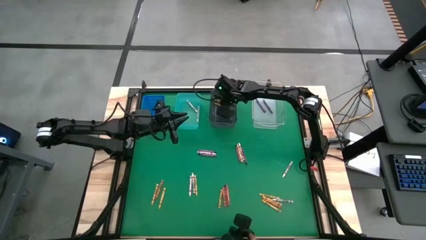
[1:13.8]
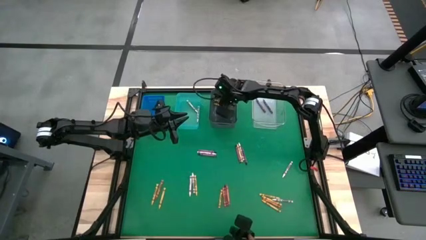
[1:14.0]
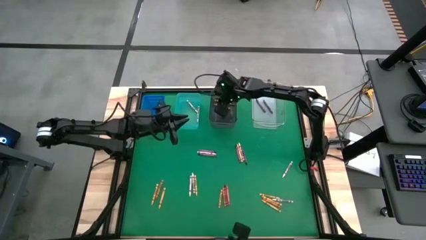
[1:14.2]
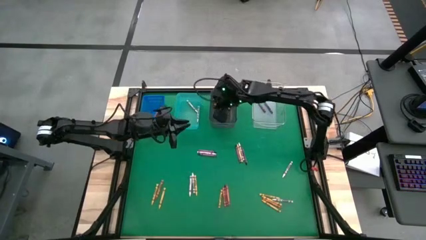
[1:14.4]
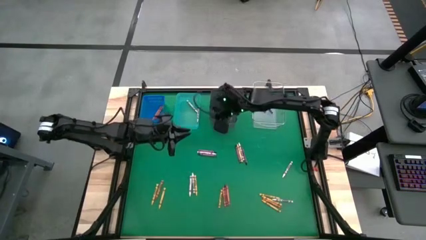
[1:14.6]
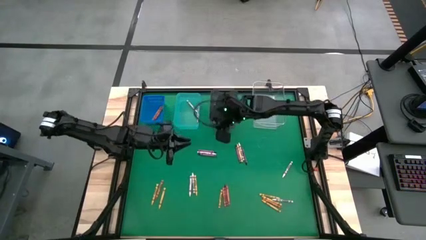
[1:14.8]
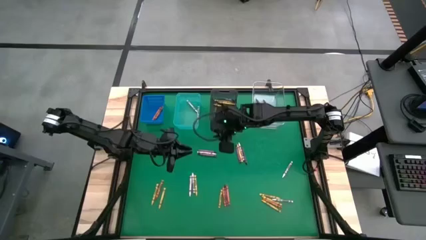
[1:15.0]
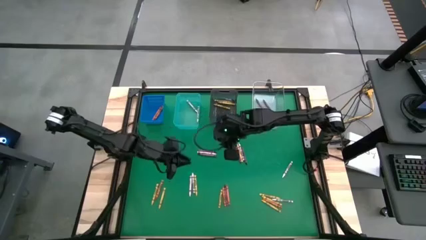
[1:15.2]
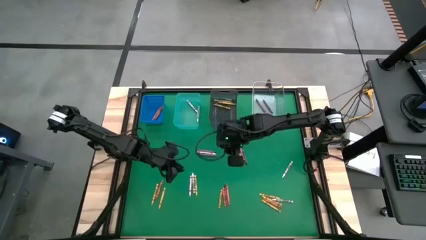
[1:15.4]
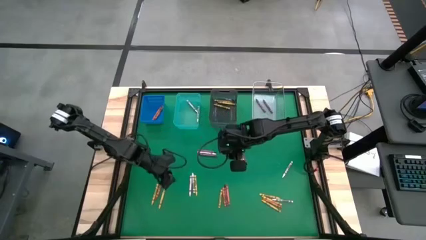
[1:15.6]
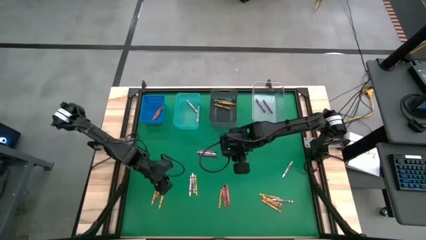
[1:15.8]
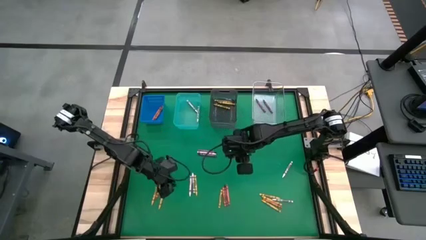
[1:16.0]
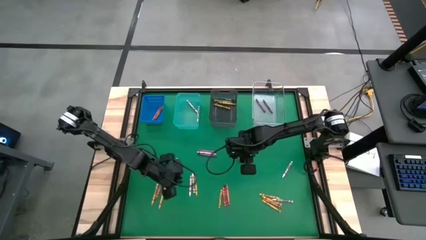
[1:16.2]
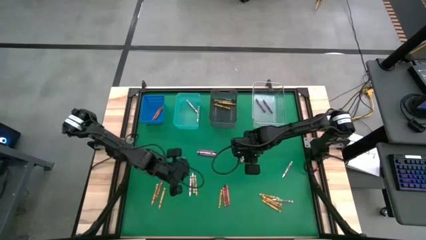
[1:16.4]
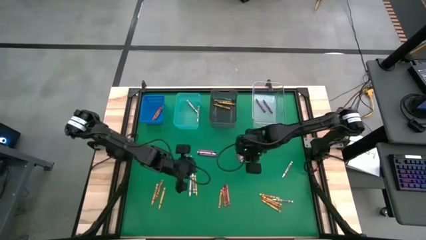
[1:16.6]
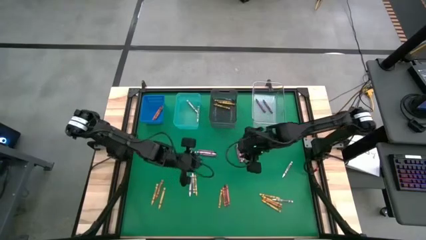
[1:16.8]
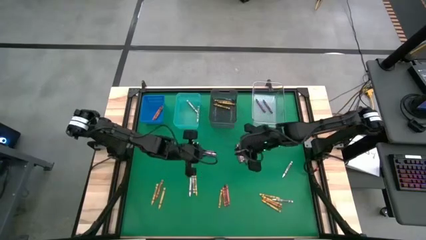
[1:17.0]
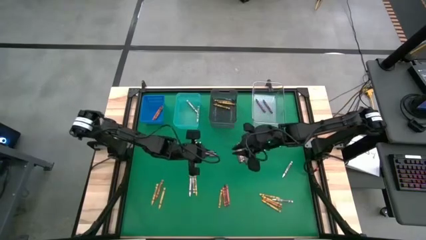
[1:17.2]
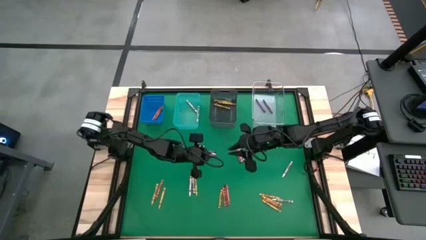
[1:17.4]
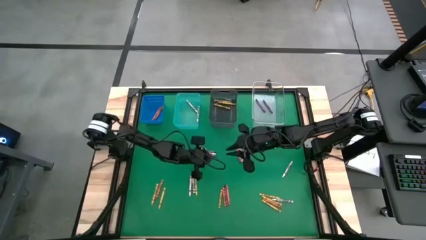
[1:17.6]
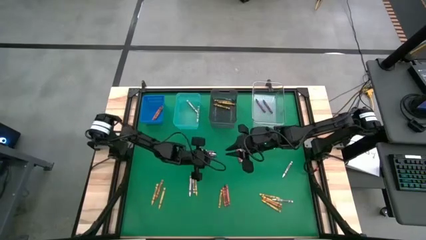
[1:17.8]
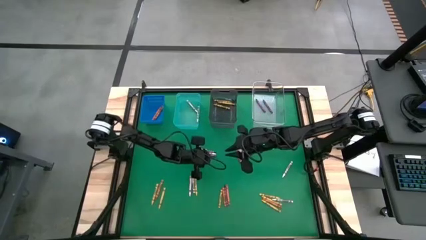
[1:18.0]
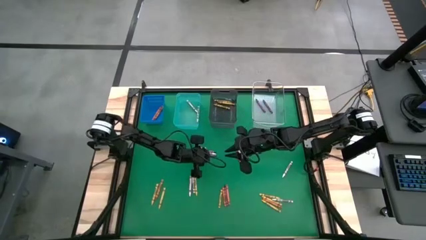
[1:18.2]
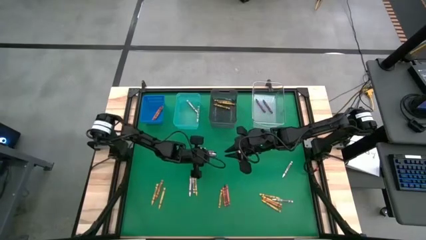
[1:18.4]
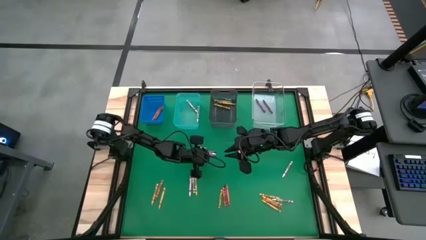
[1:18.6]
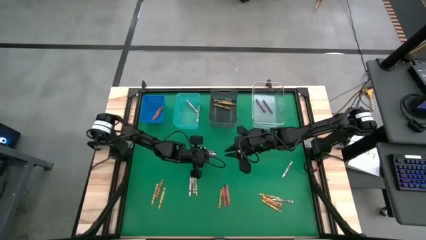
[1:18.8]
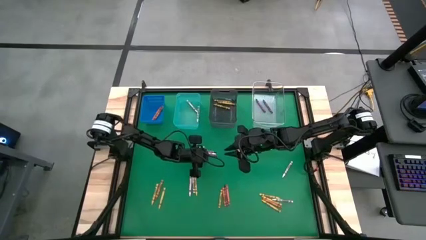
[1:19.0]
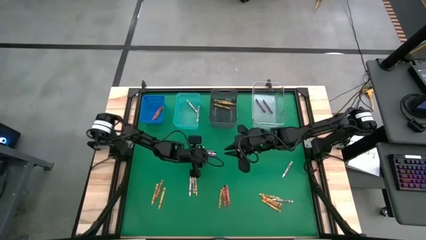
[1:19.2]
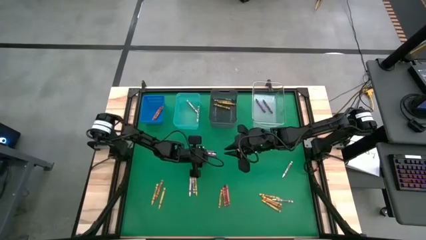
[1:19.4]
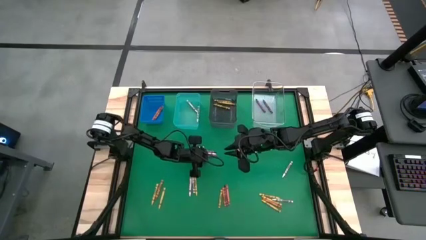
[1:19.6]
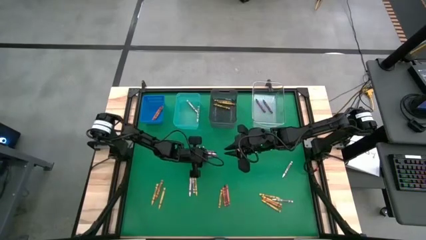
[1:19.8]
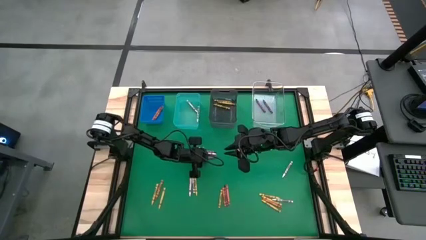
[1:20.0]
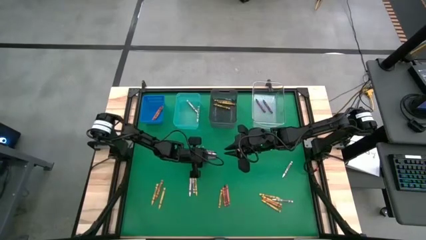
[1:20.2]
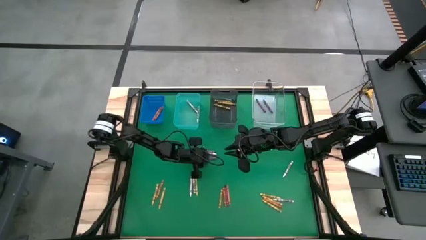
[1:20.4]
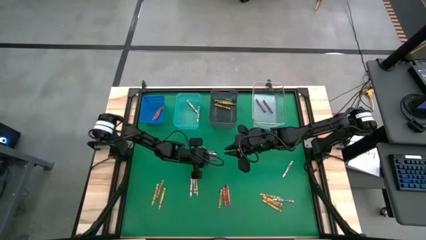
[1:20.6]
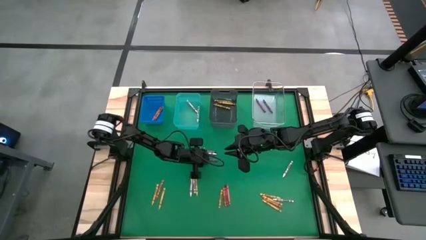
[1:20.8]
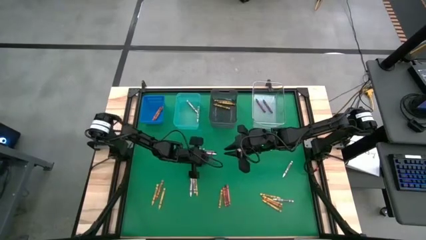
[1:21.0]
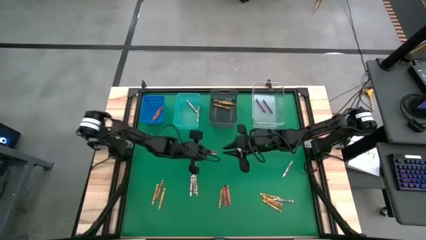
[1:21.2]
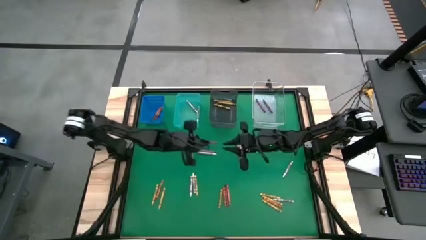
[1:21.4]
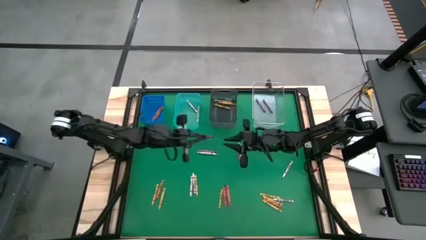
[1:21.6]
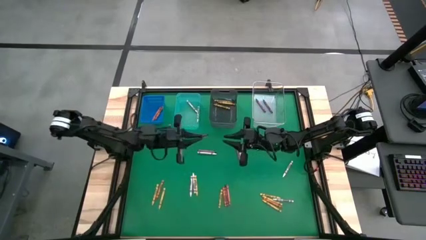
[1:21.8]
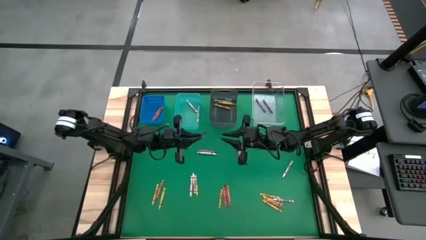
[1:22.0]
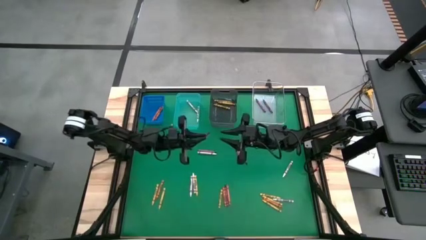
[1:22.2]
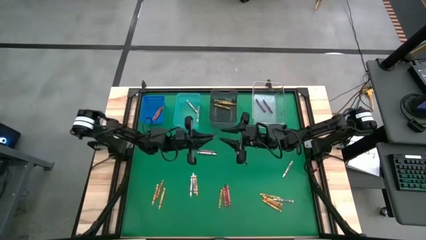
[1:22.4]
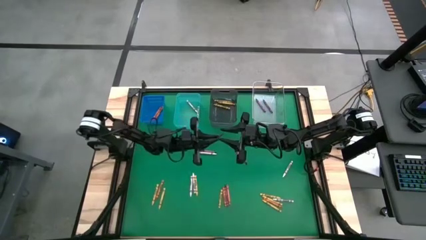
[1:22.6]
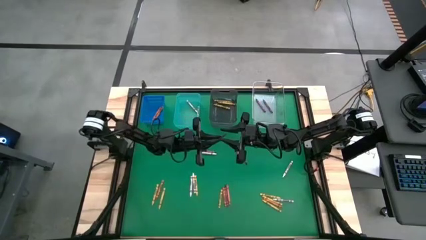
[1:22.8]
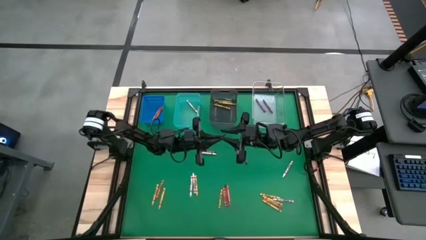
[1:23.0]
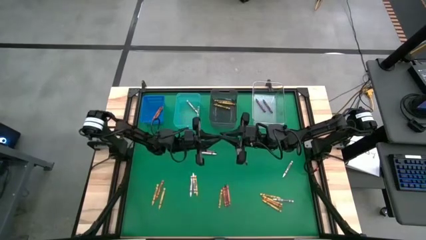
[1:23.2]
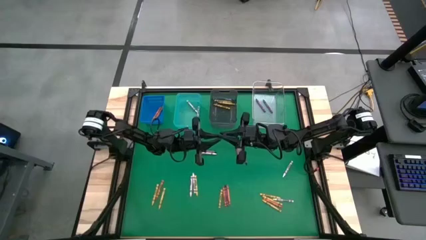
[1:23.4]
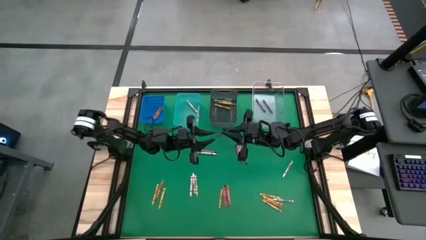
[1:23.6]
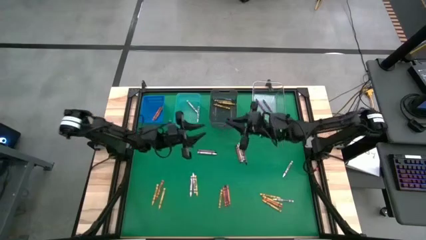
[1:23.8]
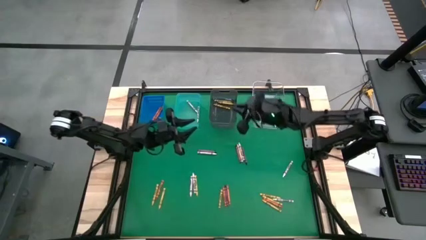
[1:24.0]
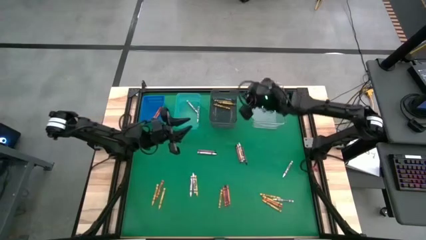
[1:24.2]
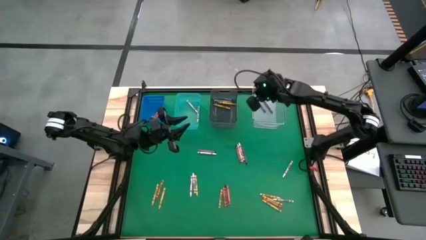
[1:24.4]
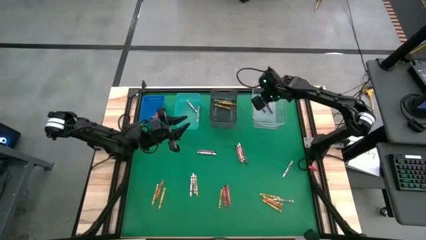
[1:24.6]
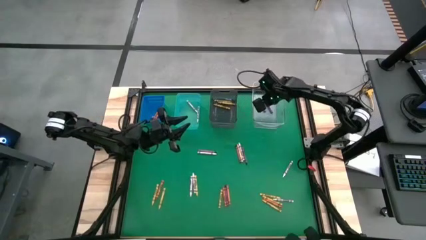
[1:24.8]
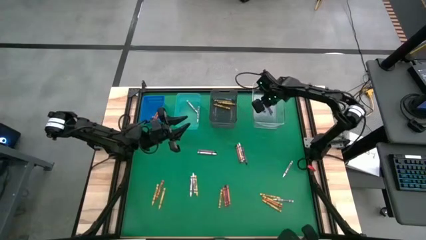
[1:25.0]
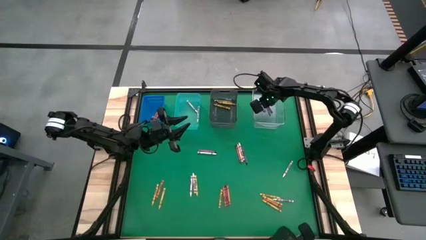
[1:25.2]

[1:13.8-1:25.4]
Task: Sort crayons
Put the violet crayon into the bin
